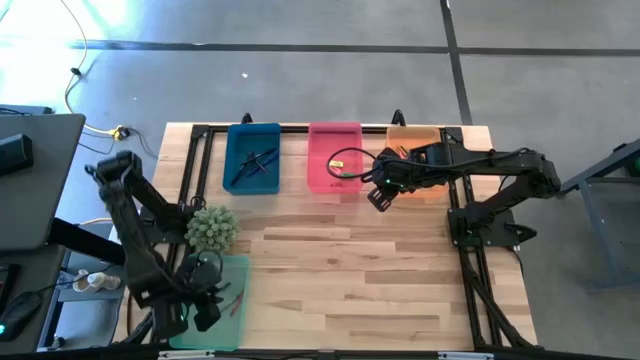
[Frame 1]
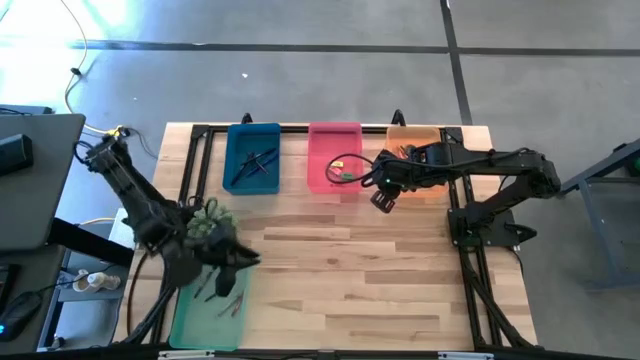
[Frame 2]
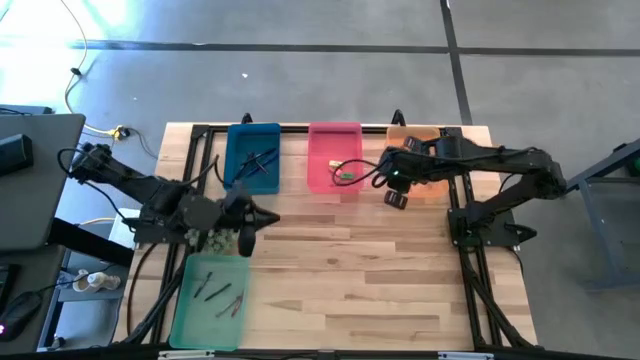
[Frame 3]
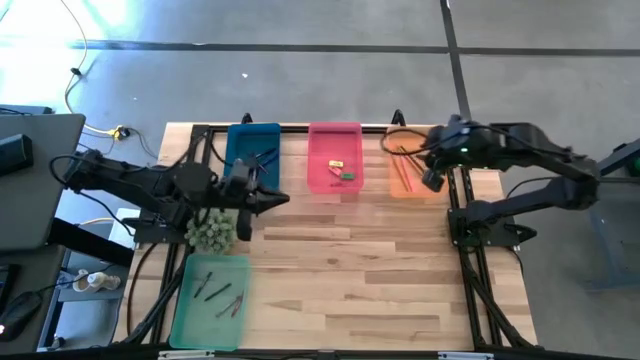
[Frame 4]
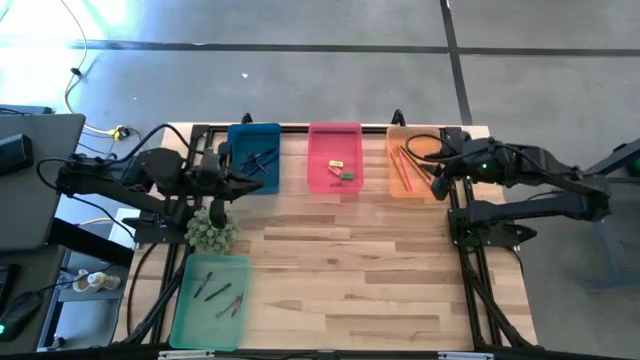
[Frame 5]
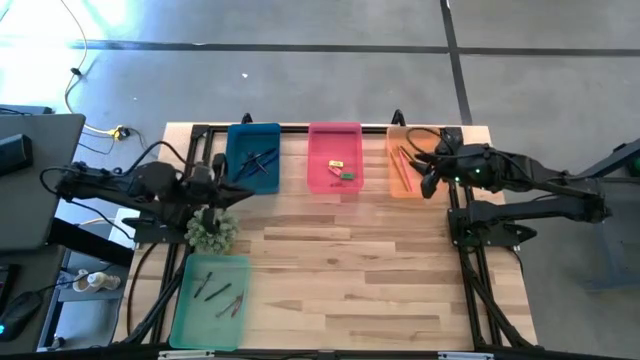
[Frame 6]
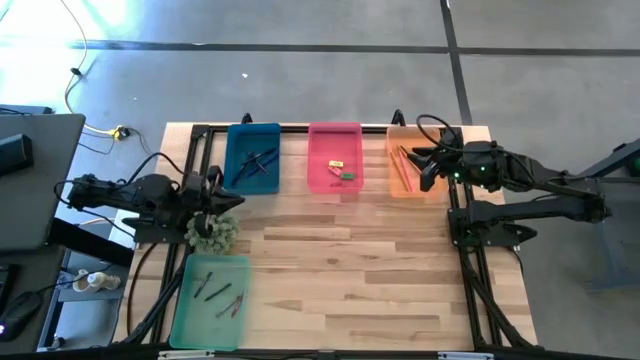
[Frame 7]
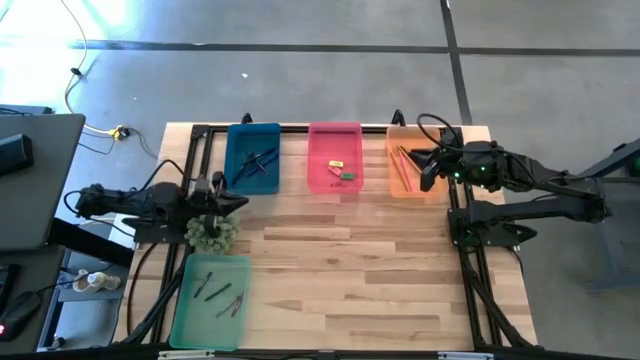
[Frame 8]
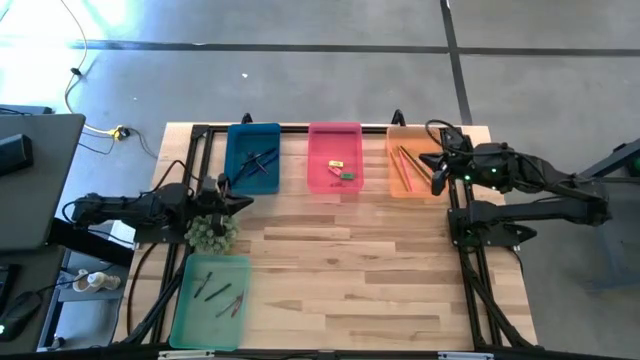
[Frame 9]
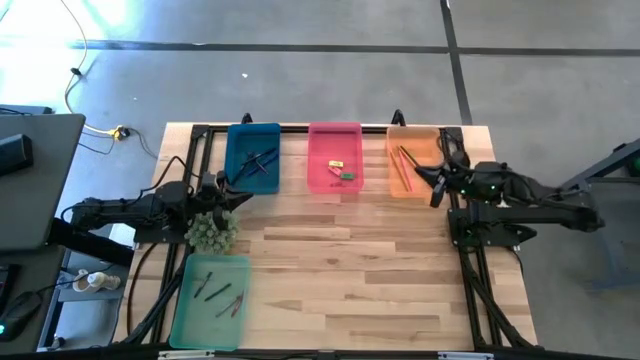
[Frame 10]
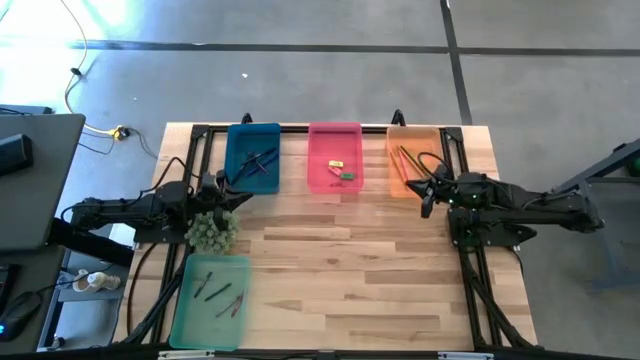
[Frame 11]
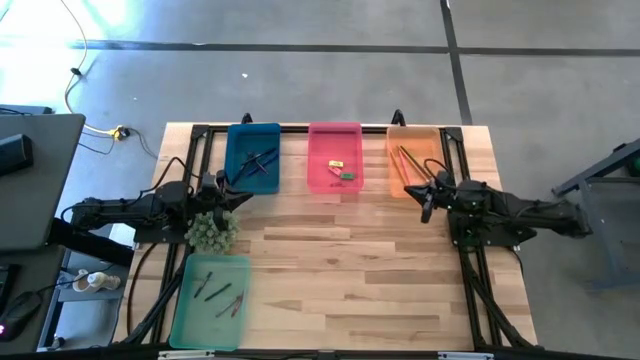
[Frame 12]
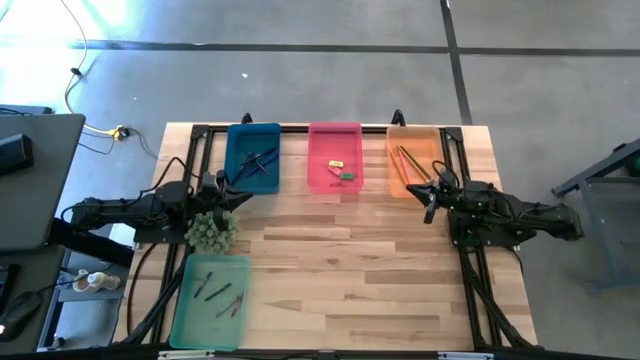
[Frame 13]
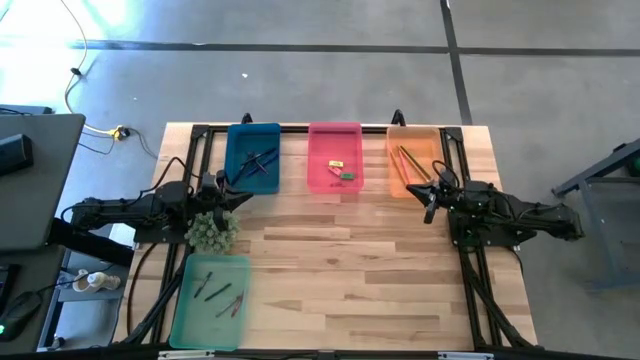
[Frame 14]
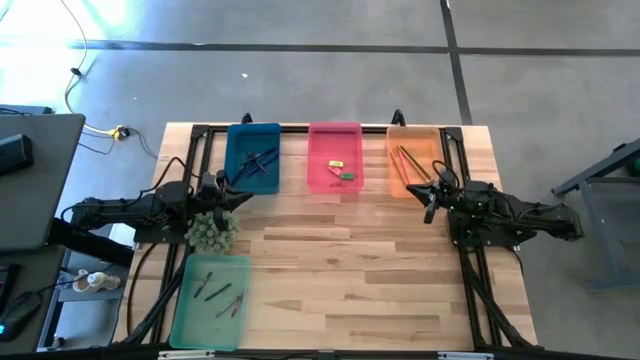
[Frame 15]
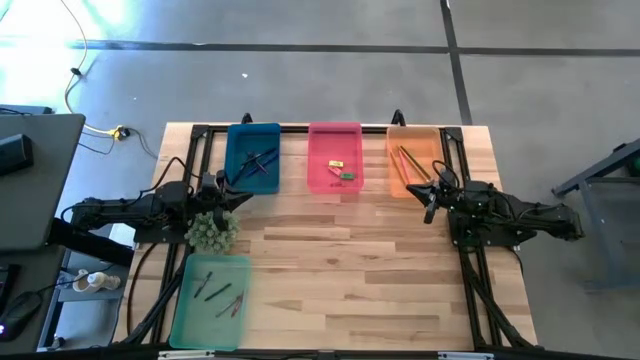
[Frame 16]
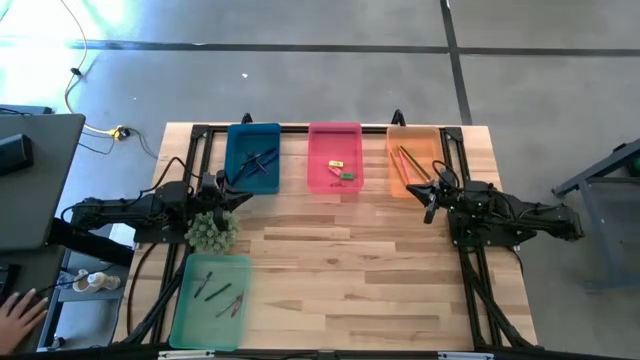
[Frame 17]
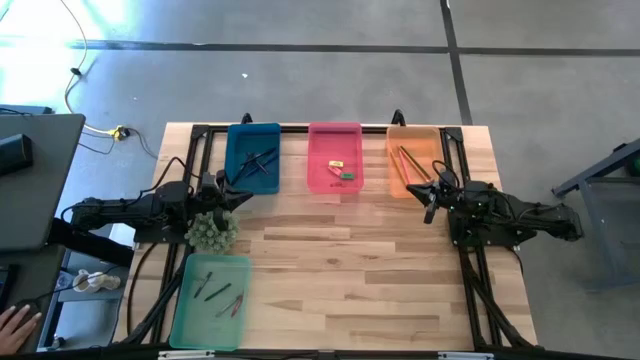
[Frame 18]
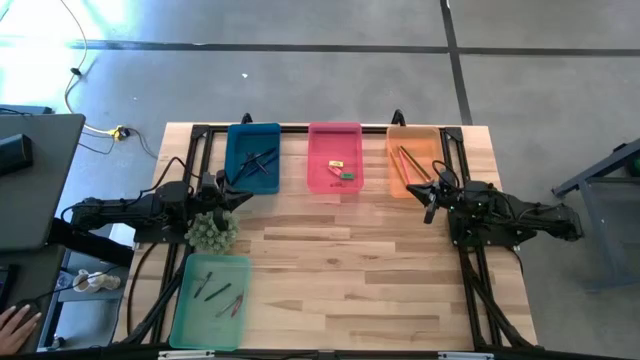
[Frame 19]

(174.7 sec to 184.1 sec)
Task: Sort crayons/erasers/pens/pencils in bins
Return to Home Position

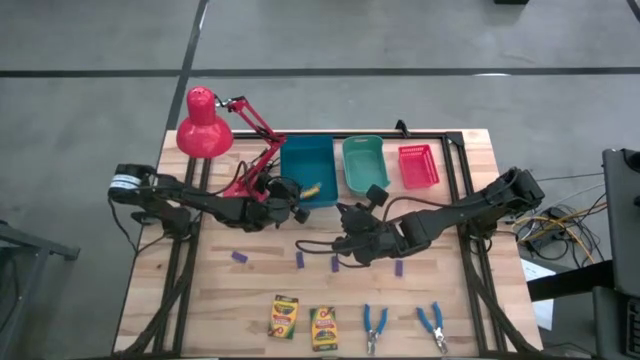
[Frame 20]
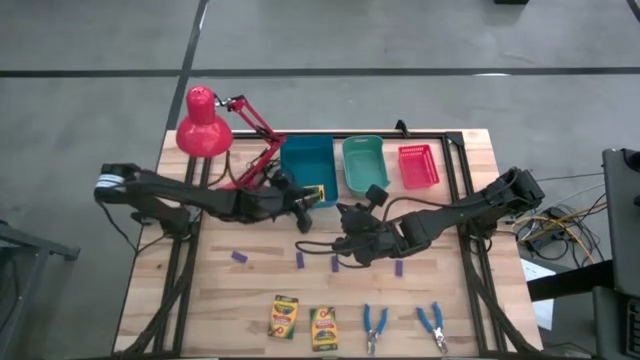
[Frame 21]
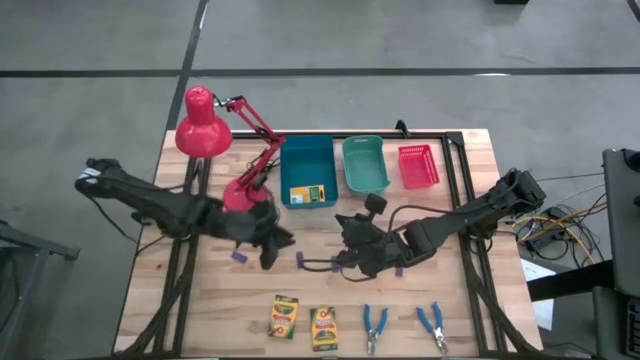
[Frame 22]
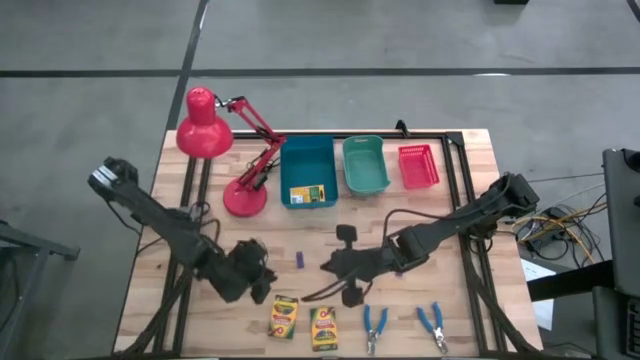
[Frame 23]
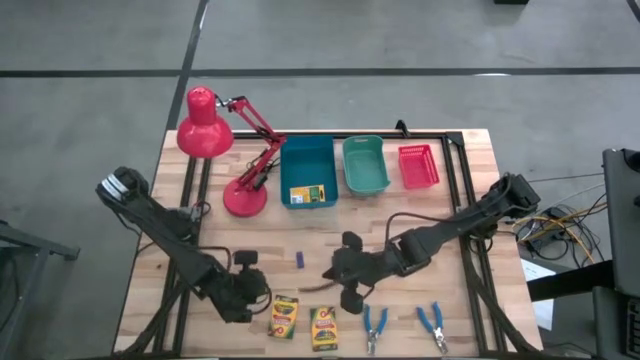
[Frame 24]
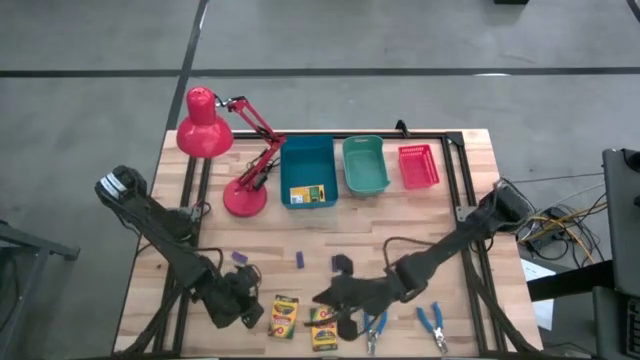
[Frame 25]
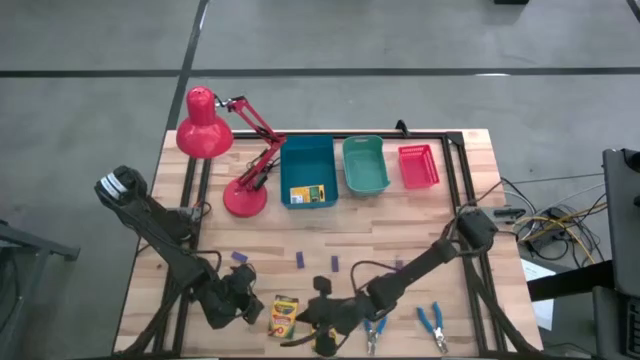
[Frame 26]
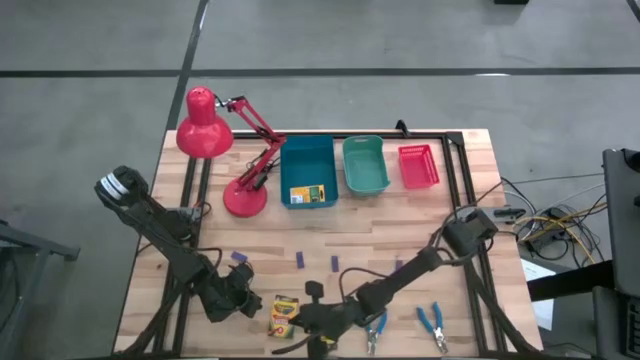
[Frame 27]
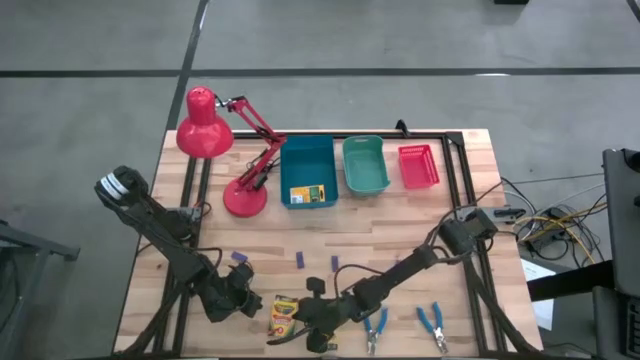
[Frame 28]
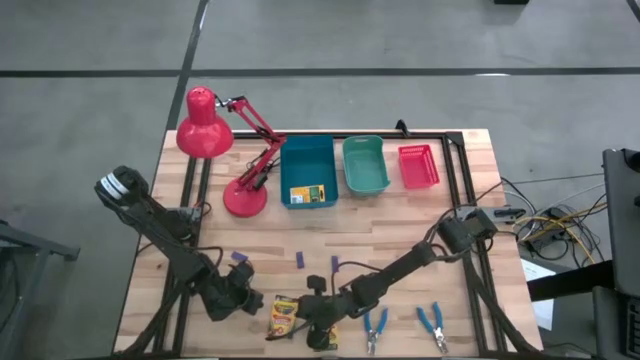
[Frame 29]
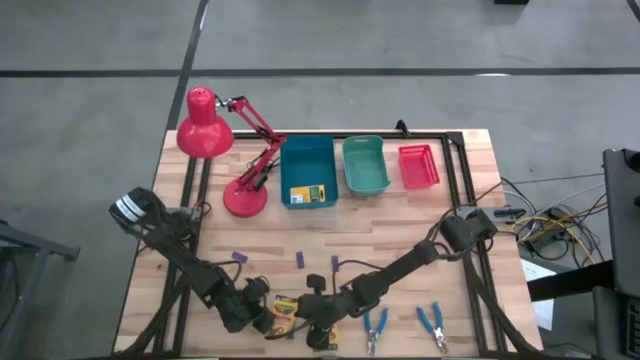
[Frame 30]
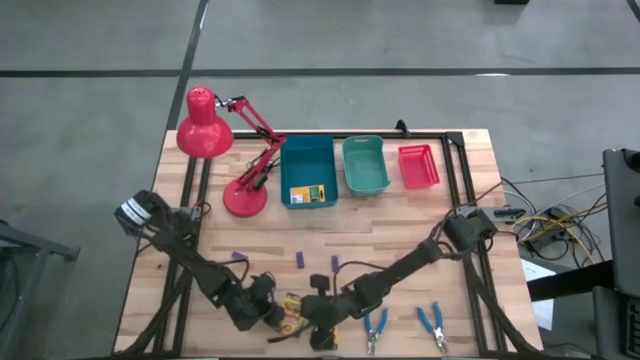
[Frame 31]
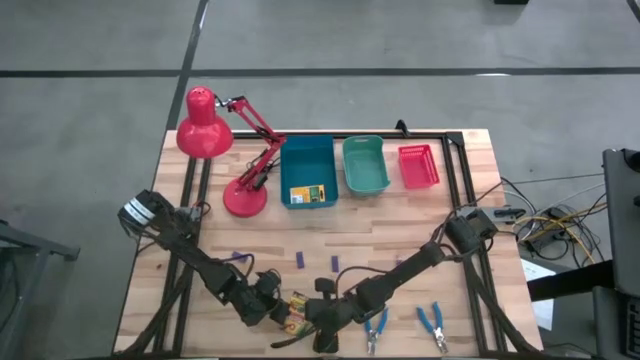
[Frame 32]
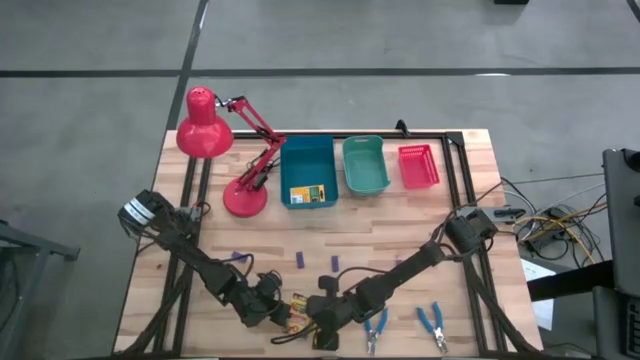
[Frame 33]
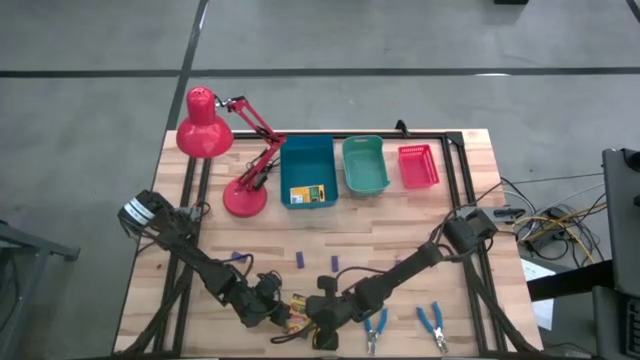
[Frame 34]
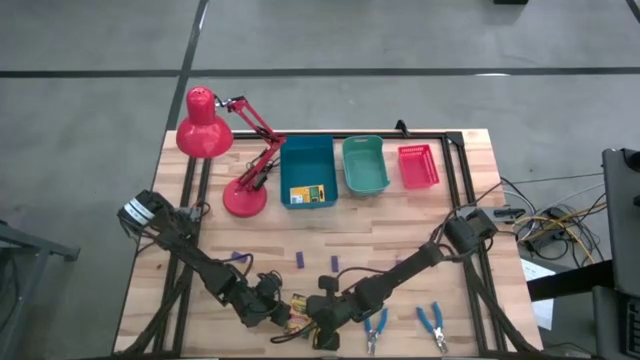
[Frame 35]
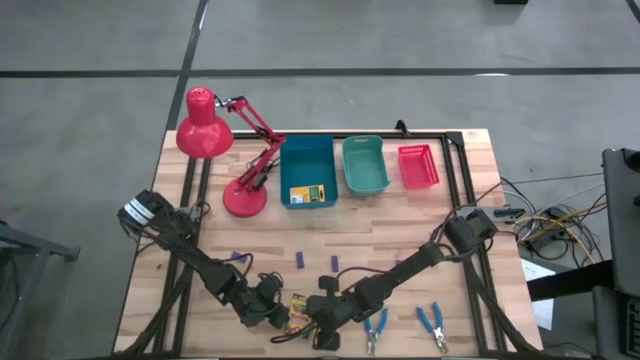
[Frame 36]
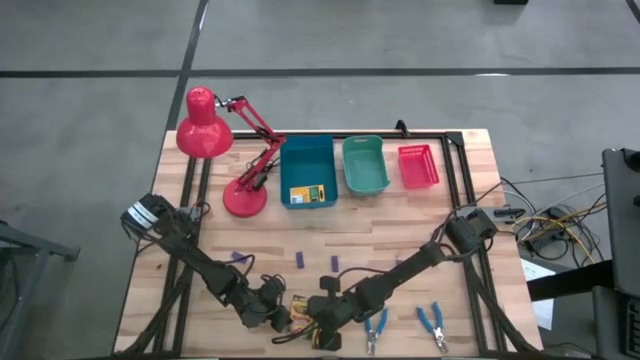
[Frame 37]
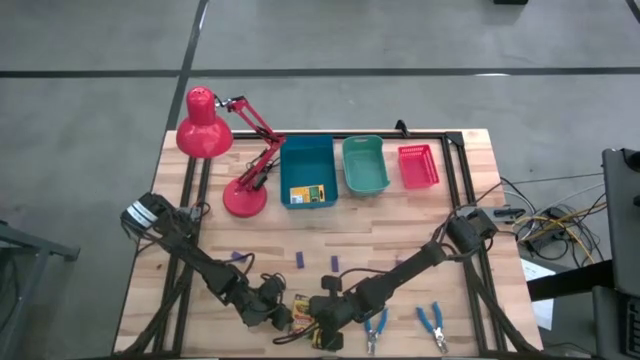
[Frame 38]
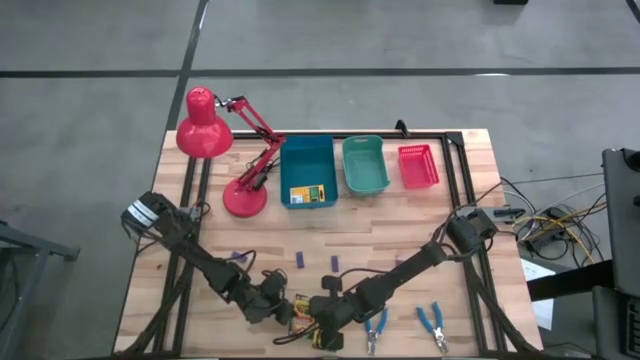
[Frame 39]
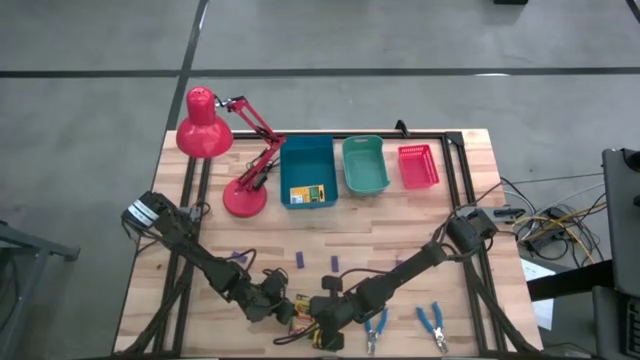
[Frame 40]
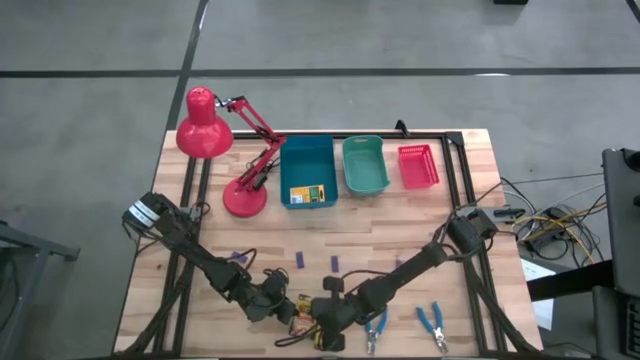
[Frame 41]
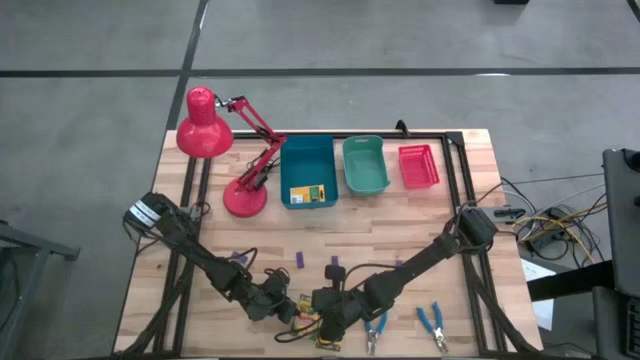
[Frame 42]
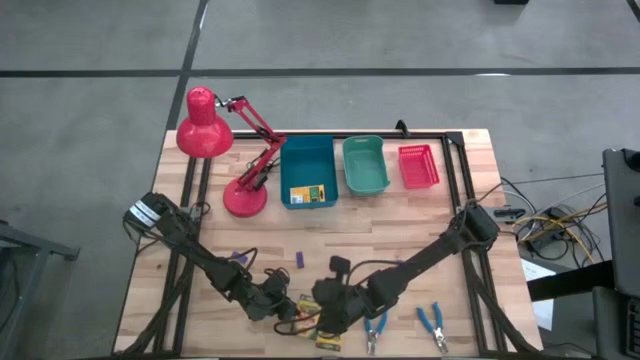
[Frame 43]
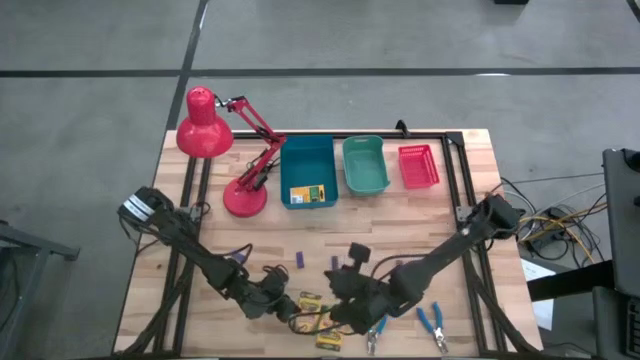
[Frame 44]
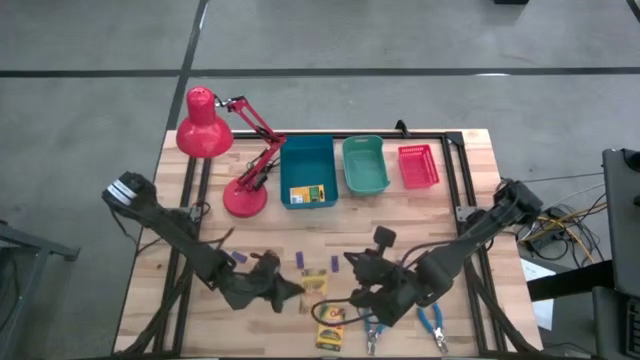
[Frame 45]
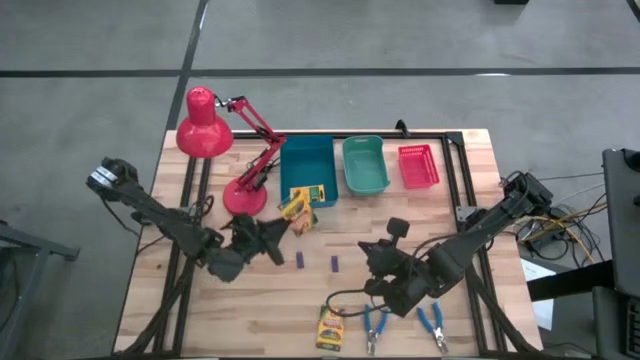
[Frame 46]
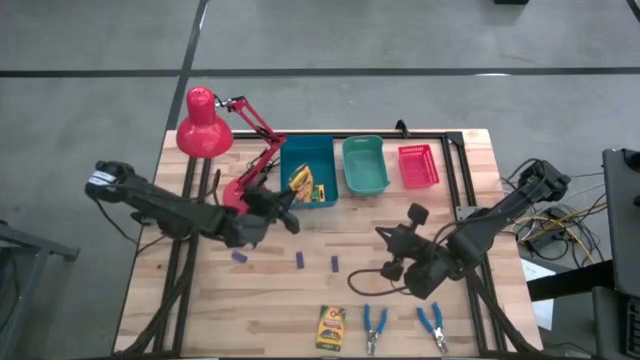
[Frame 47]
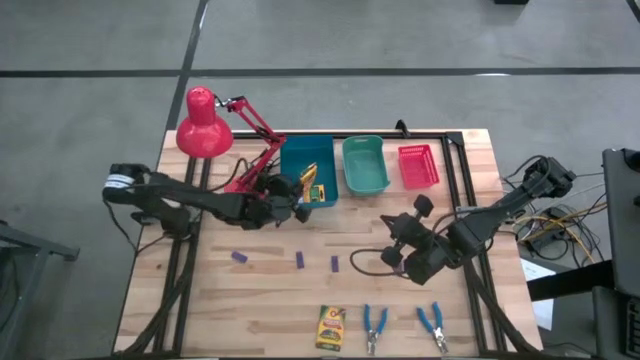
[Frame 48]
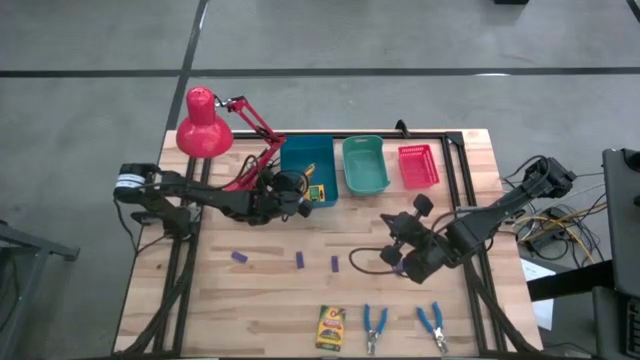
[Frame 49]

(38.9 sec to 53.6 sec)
Task: Pick & Place School Supplies
Put the crayon box into the blue bin
